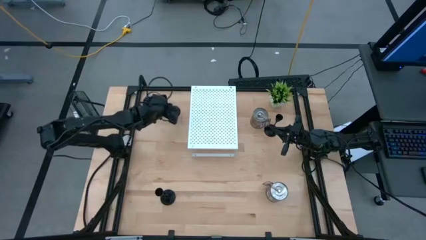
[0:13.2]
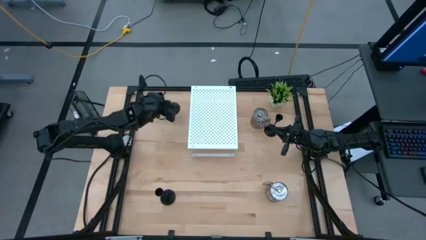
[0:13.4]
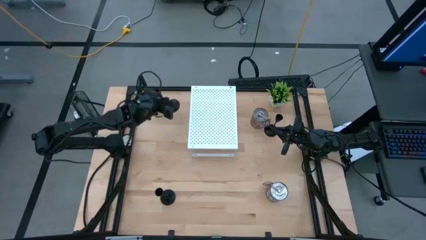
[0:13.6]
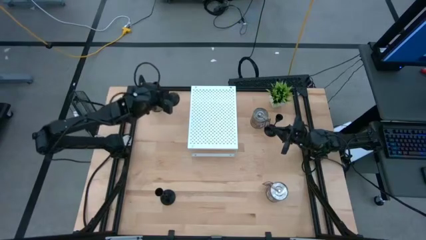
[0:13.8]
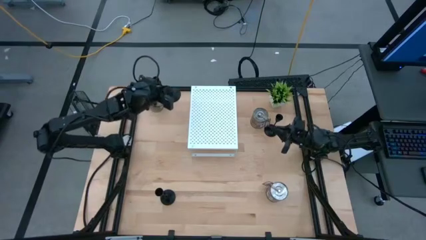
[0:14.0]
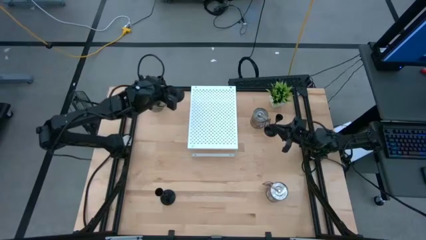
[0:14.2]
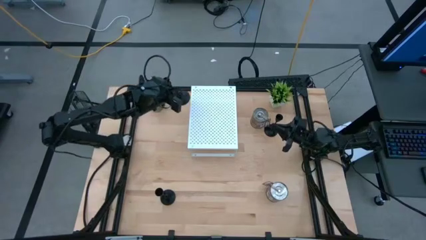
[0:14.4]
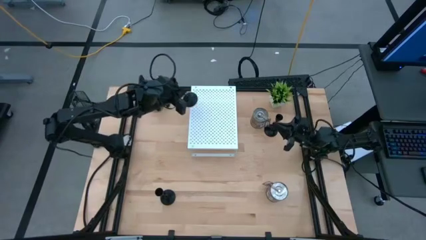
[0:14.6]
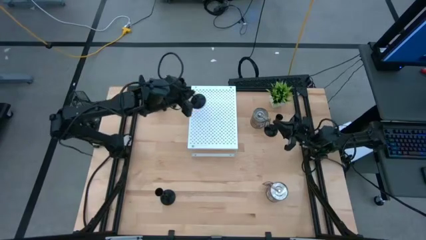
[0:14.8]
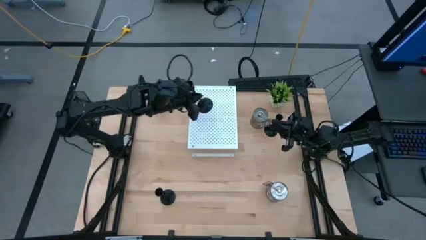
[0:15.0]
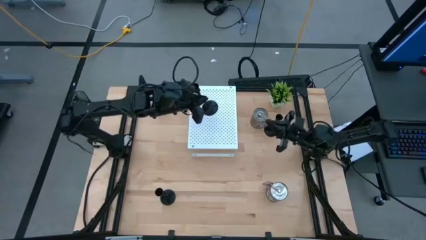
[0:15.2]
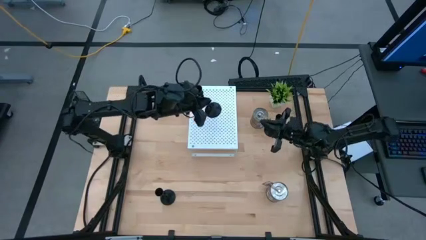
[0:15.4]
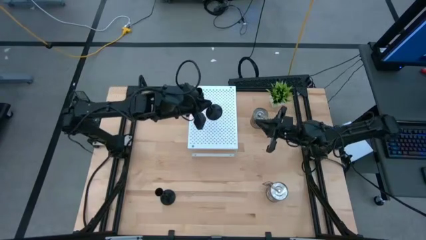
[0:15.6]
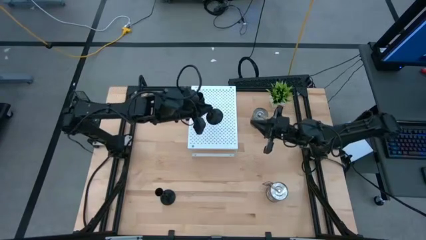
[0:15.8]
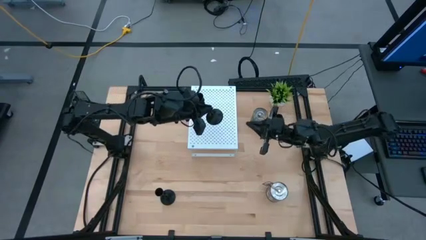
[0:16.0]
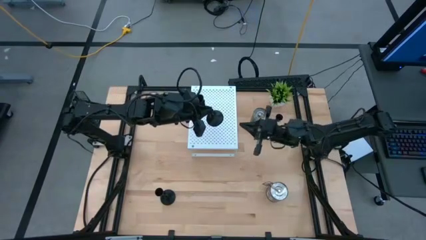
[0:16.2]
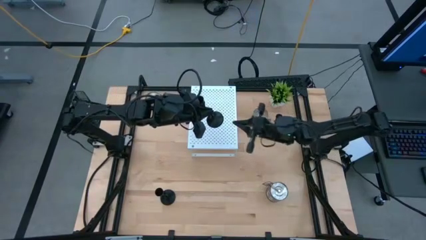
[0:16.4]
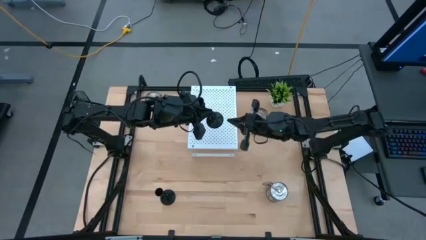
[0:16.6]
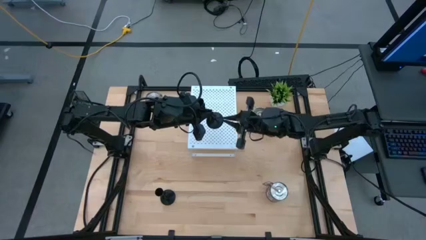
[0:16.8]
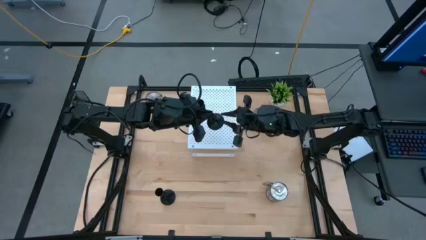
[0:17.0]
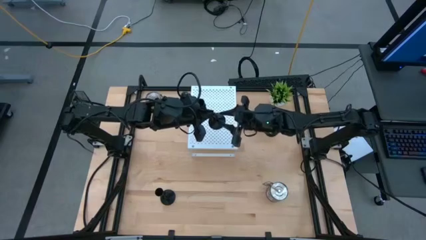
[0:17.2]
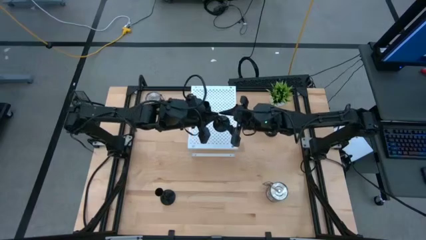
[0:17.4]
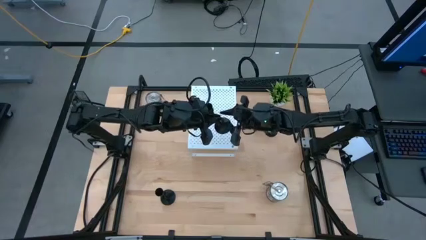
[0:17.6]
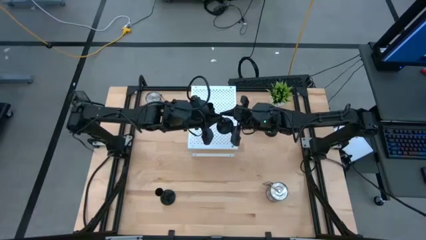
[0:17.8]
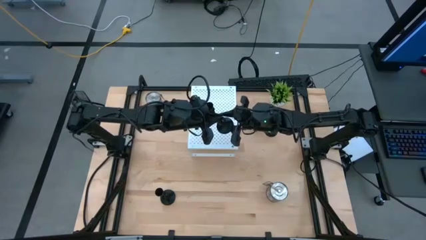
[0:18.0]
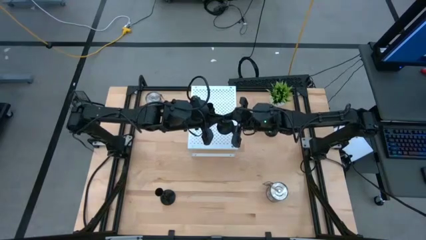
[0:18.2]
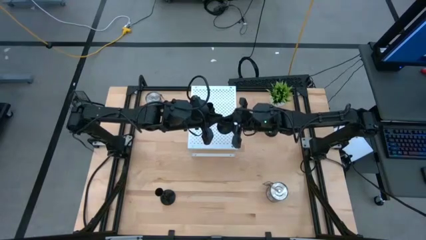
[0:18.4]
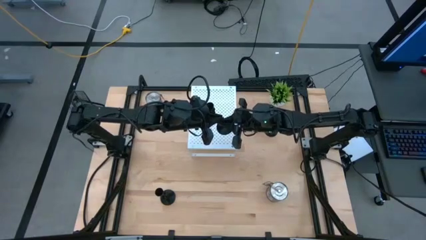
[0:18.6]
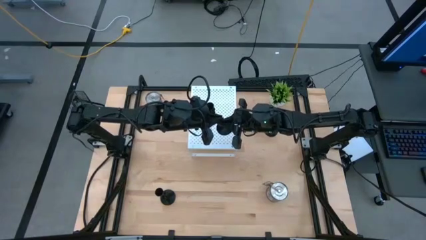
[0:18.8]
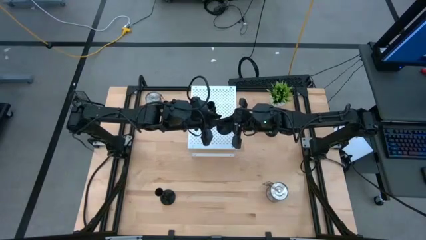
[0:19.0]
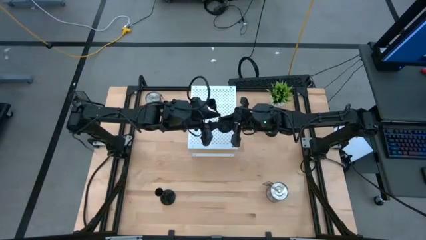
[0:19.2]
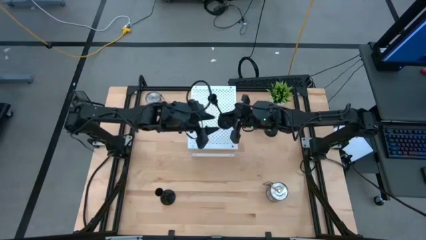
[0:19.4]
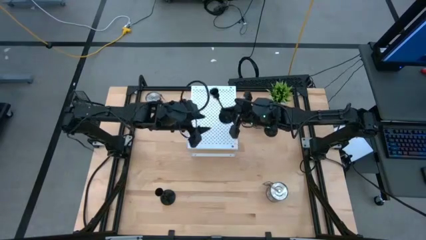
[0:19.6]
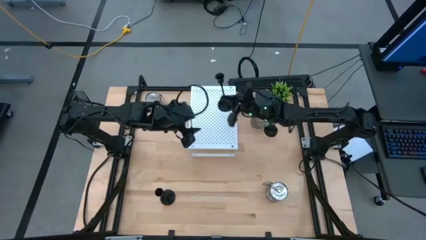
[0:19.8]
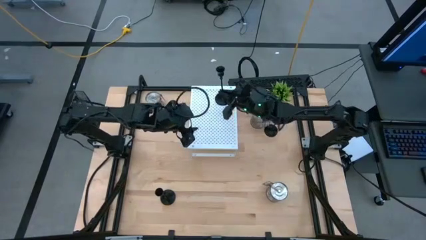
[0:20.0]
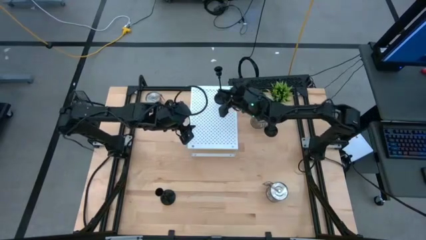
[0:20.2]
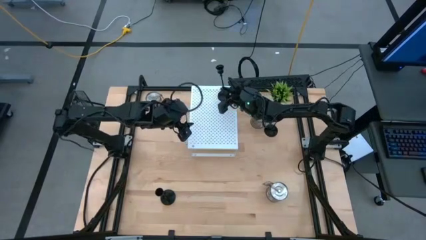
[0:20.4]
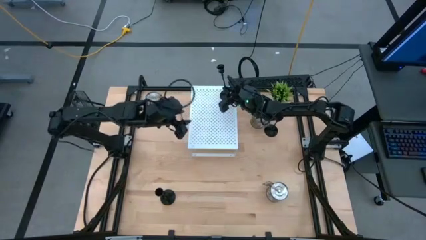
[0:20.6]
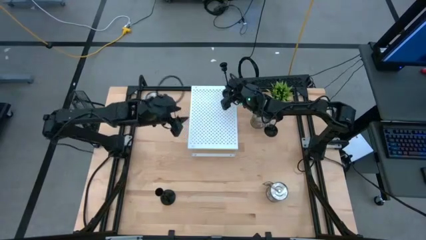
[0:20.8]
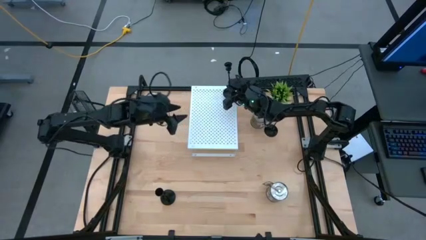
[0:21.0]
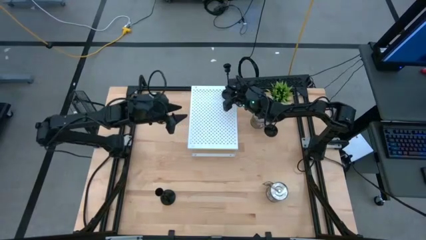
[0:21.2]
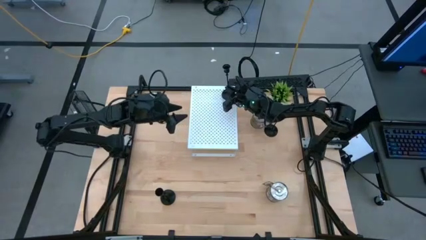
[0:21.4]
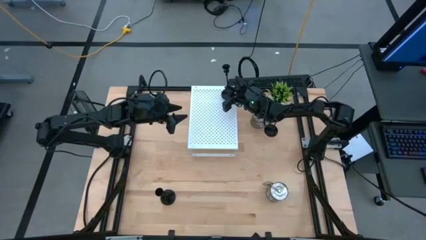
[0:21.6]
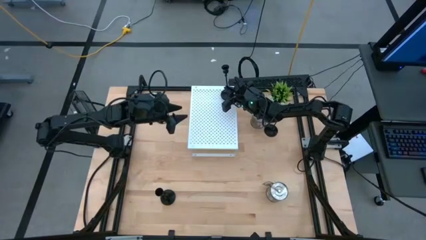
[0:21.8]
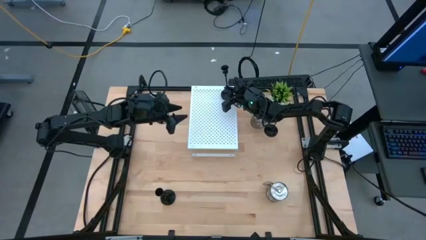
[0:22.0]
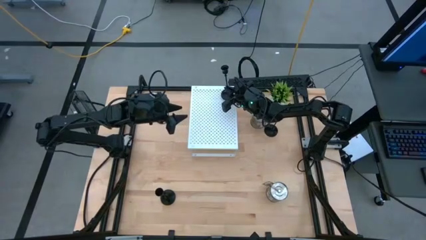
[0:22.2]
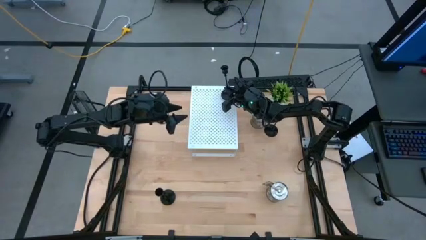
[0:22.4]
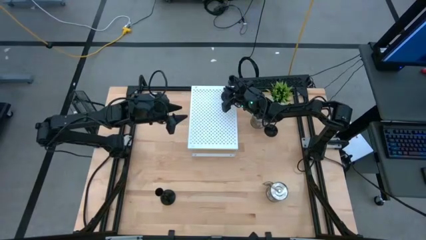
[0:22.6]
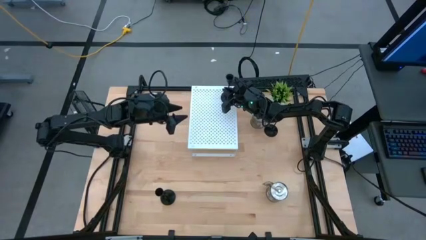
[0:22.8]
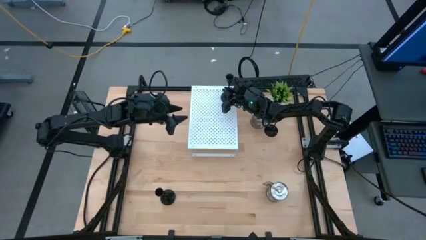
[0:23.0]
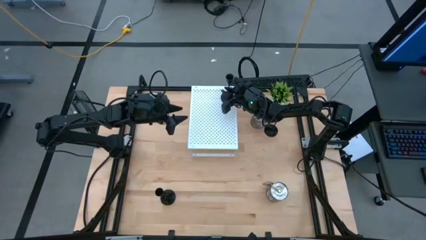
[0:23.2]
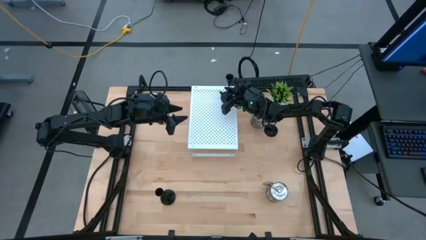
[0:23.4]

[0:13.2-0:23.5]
Task: Pick & Place candle stick holders
Put the top left black candle holder on the shelf
